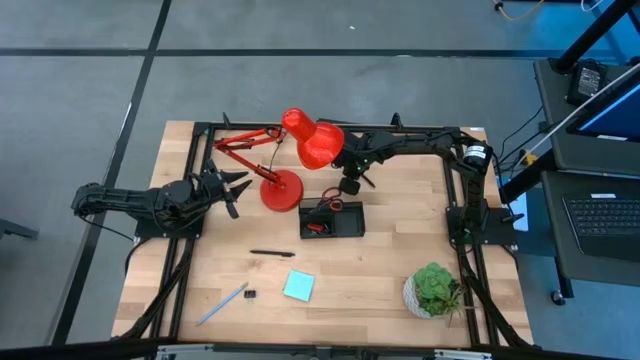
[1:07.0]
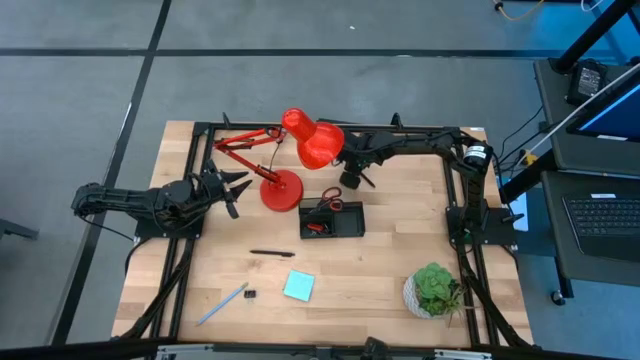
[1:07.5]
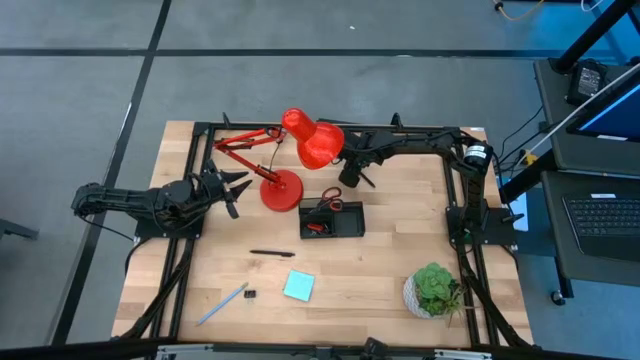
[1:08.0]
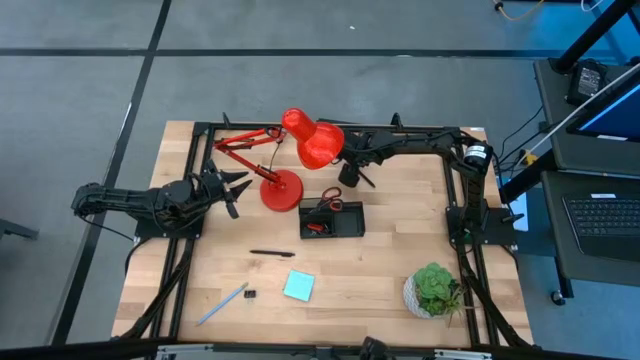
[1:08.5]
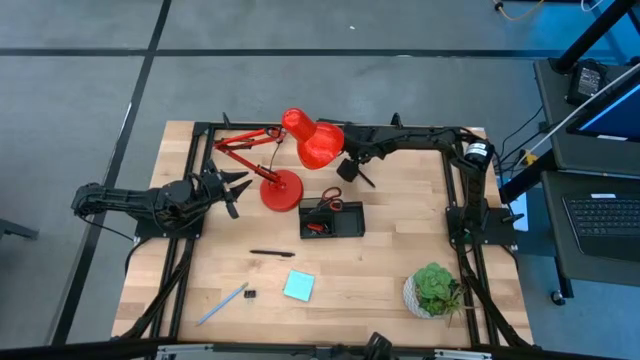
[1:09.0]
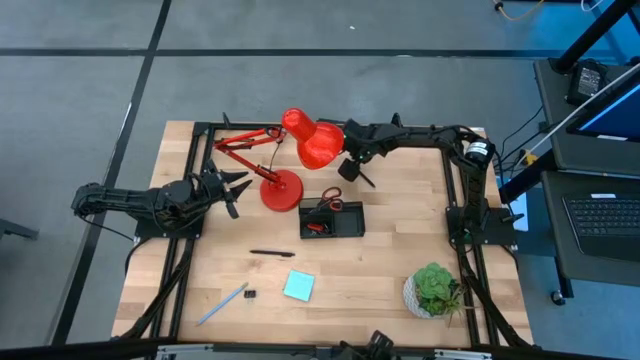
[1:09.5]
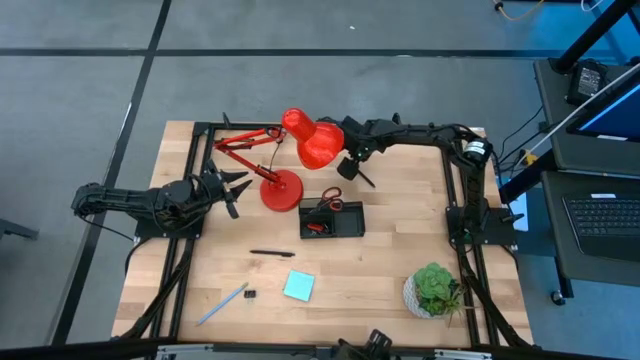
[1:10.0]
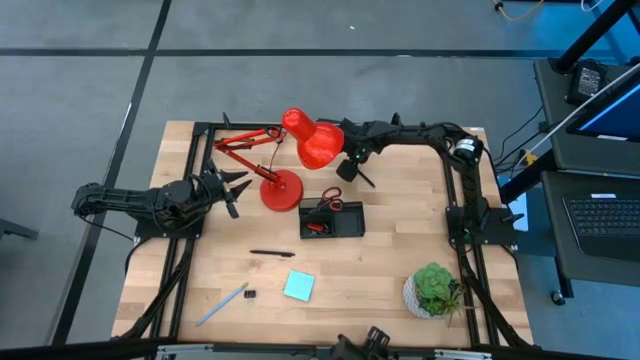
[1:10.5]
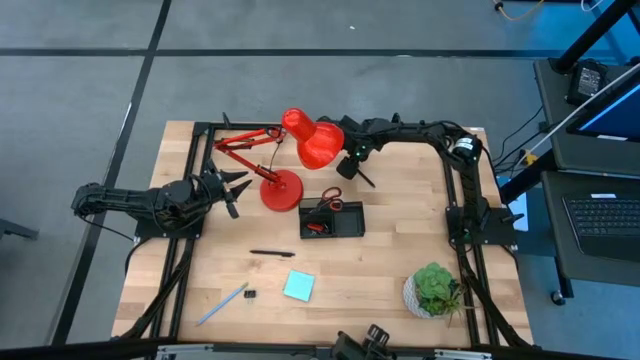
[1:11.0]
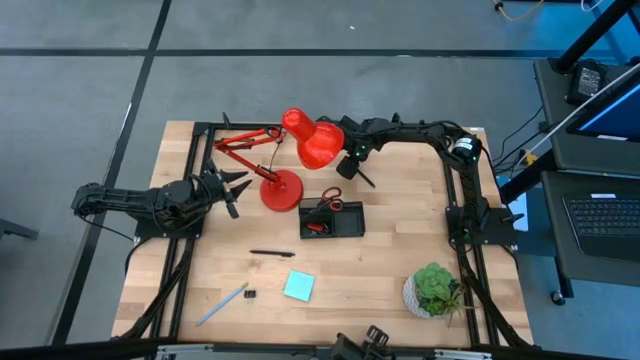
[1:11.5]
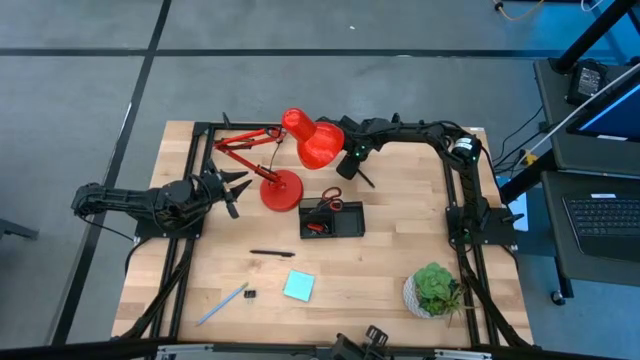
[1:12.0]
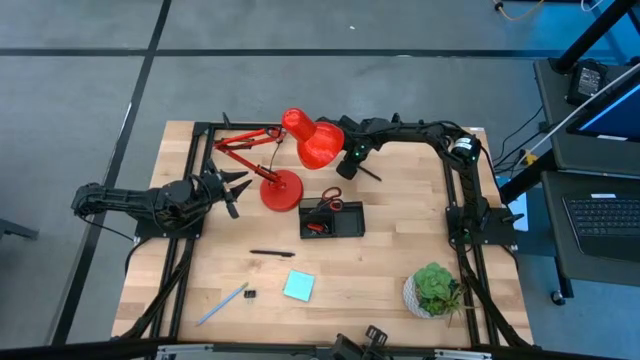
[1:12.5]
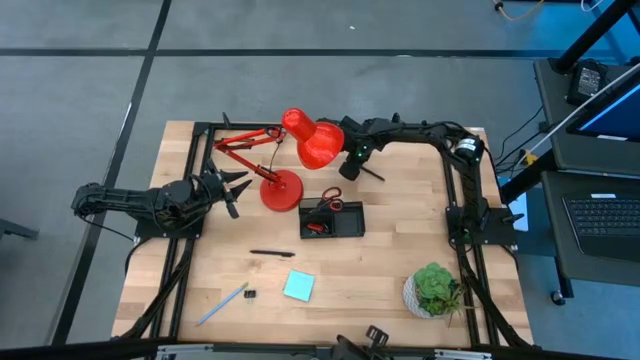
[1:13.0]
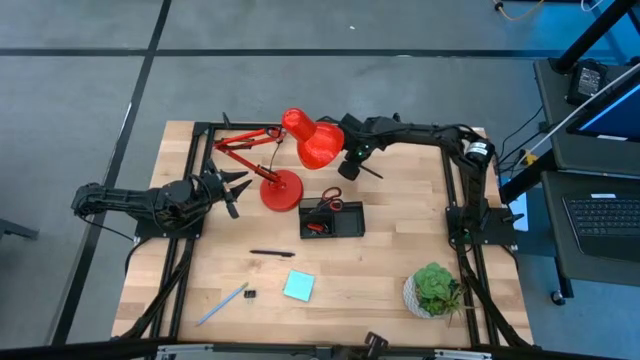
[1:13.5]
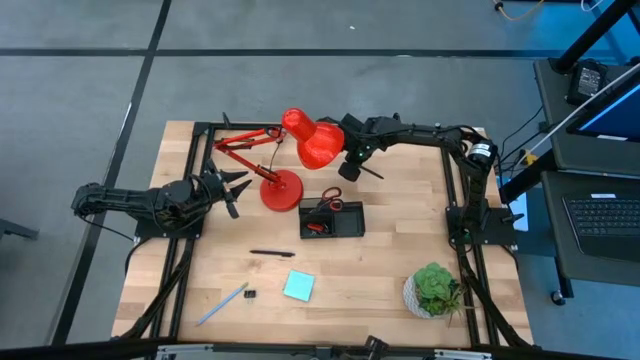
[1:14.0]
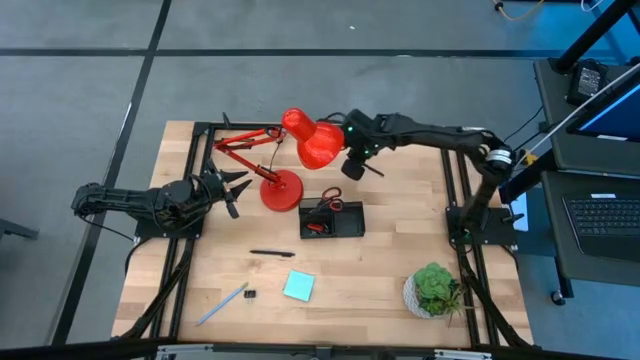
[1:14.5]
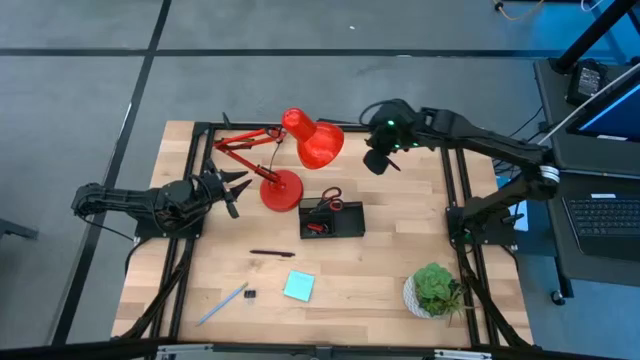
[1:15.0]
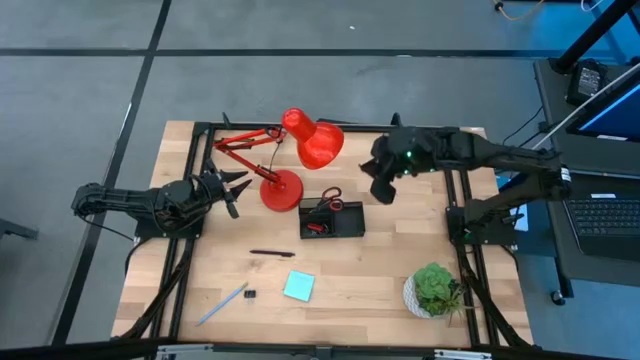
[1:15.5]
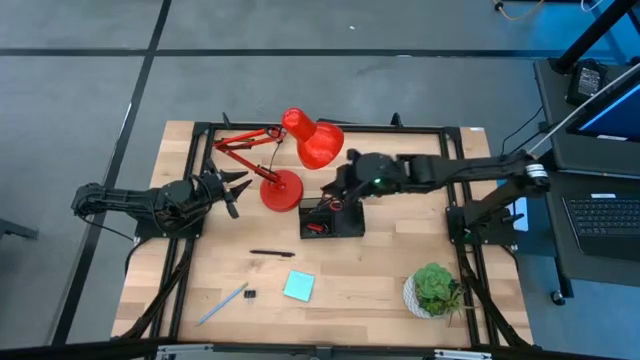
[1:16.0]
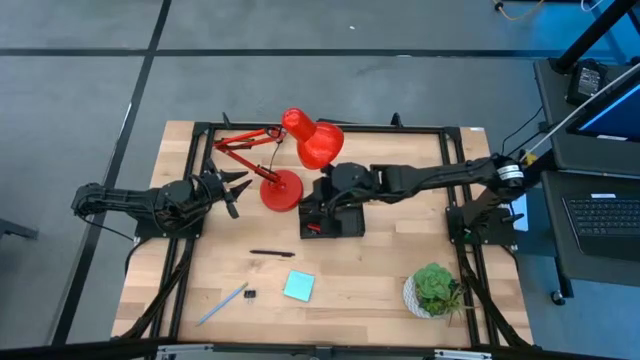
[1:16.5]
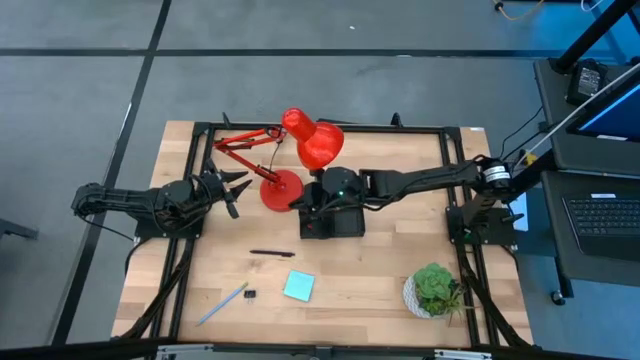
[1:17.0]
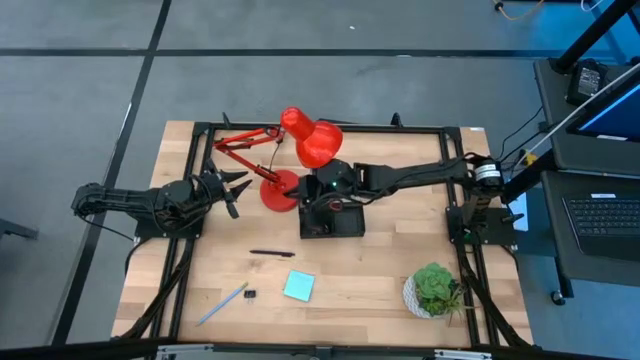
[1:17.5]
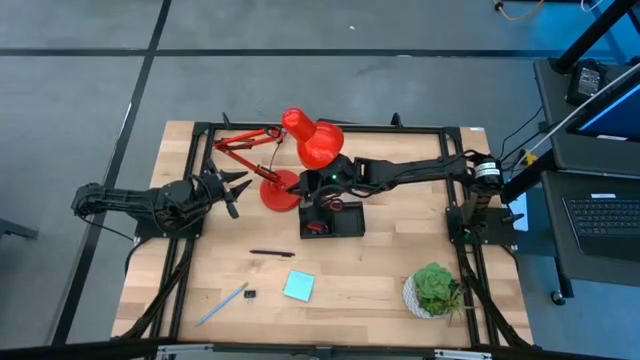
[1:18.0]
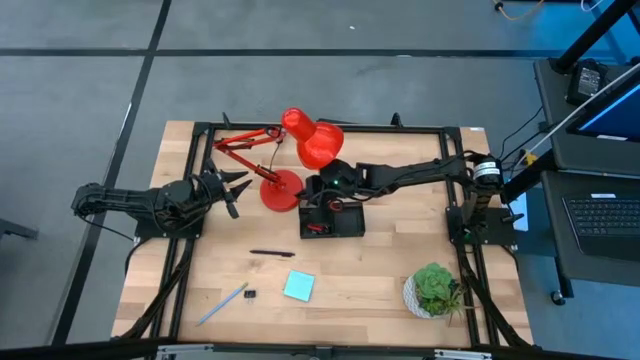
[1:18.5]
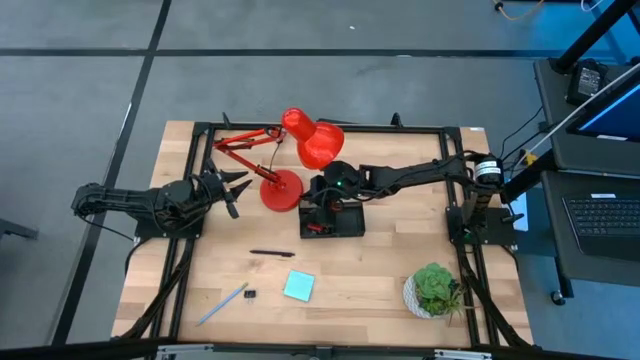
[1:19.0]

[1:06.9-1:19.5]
Task: Pick and place office supplies into organizer
Put the top black pen into the black desk organizer

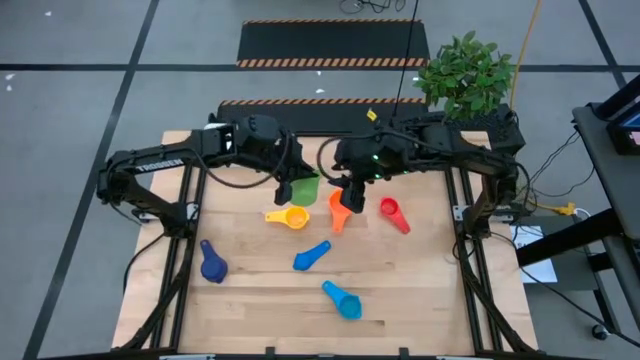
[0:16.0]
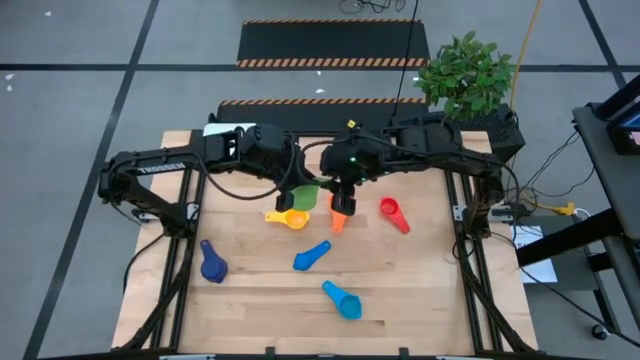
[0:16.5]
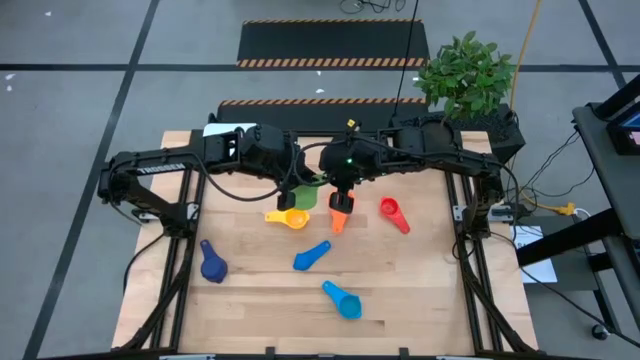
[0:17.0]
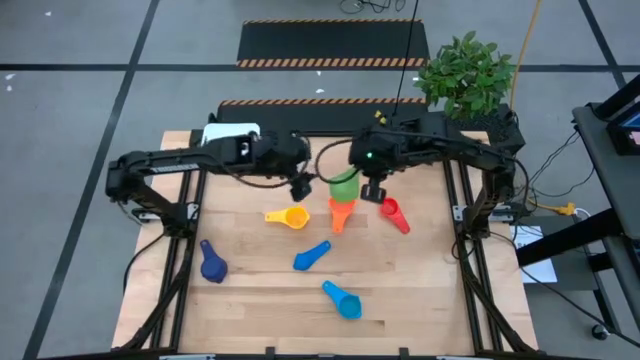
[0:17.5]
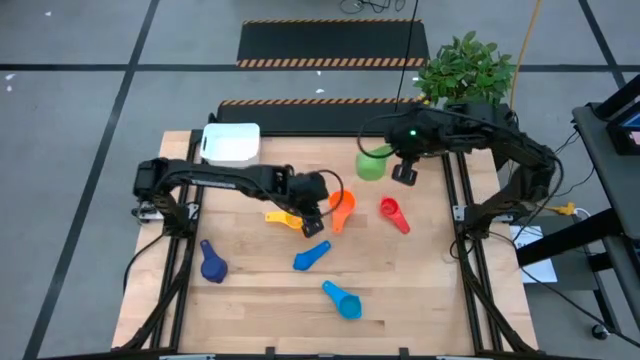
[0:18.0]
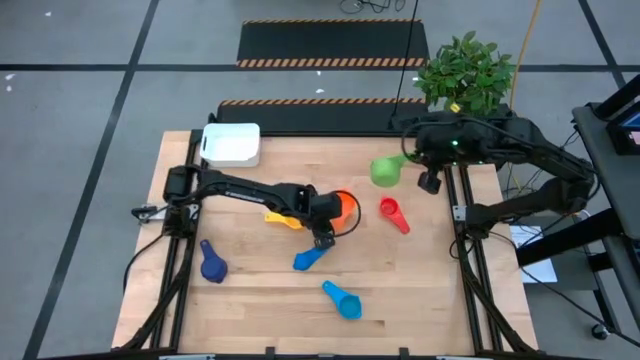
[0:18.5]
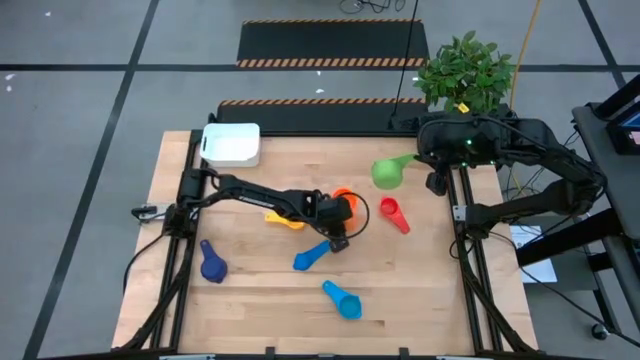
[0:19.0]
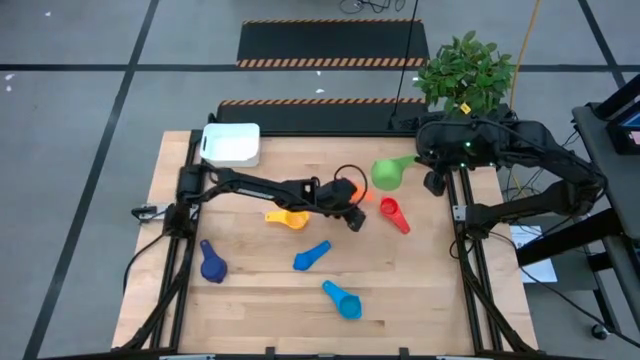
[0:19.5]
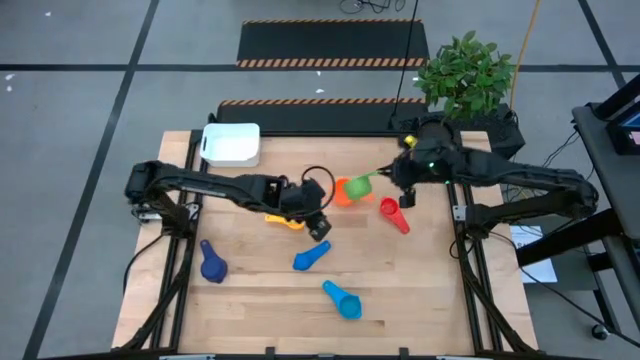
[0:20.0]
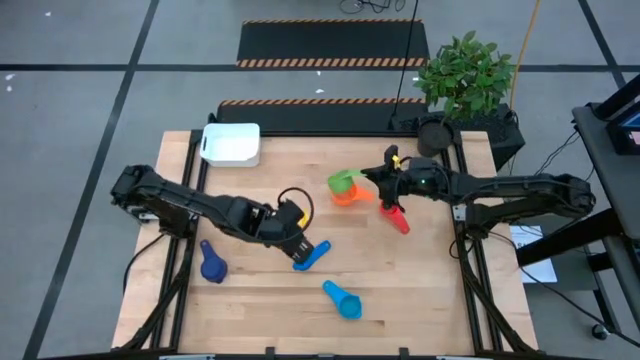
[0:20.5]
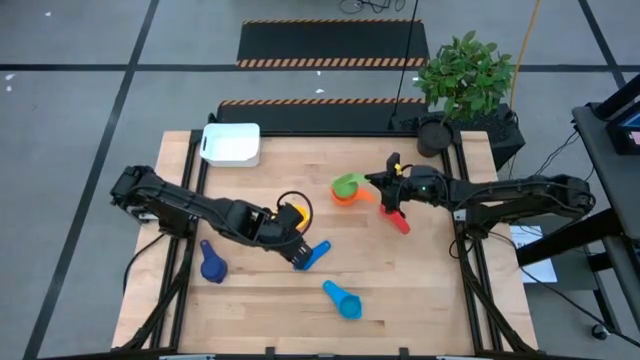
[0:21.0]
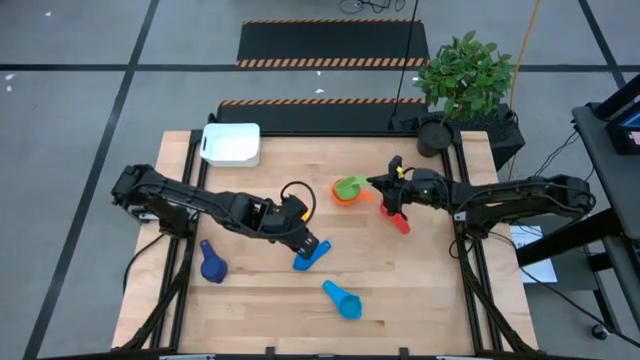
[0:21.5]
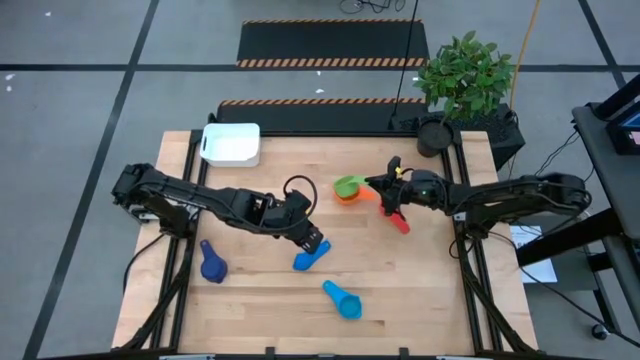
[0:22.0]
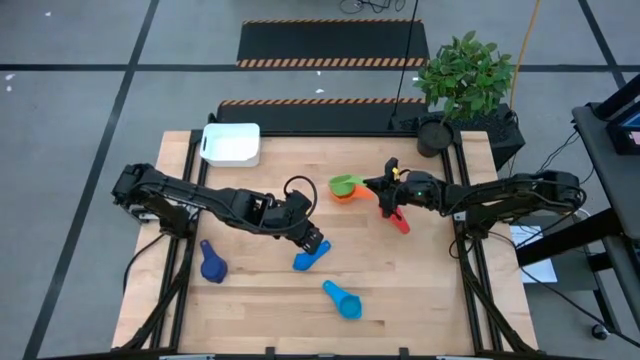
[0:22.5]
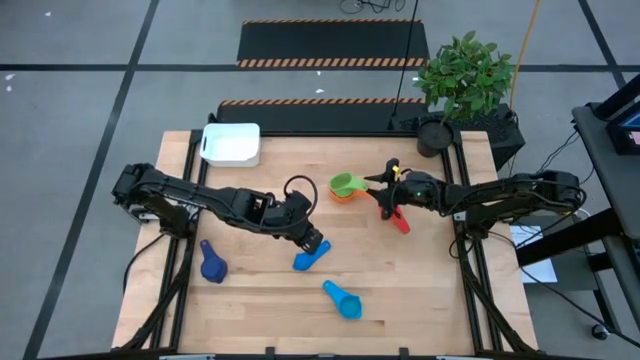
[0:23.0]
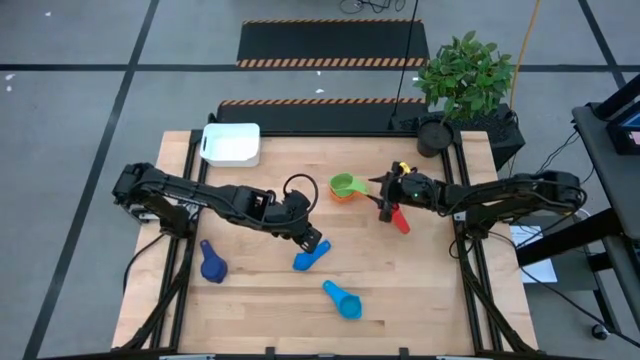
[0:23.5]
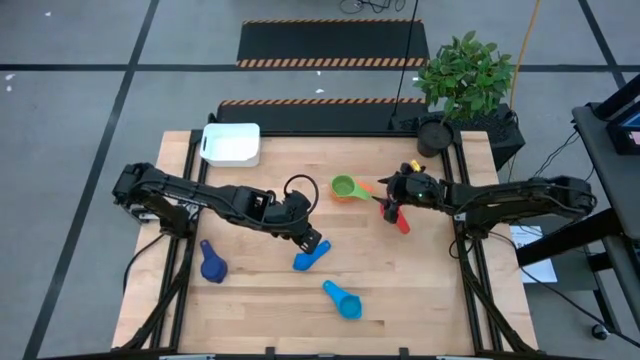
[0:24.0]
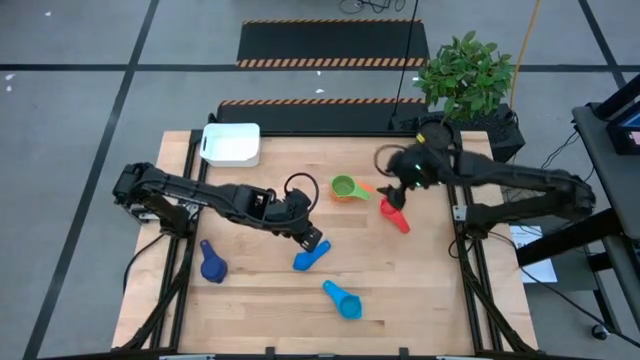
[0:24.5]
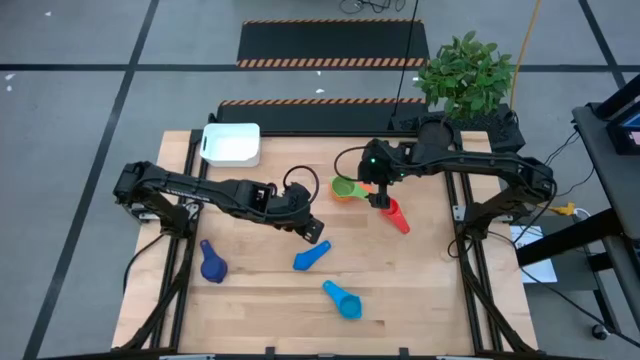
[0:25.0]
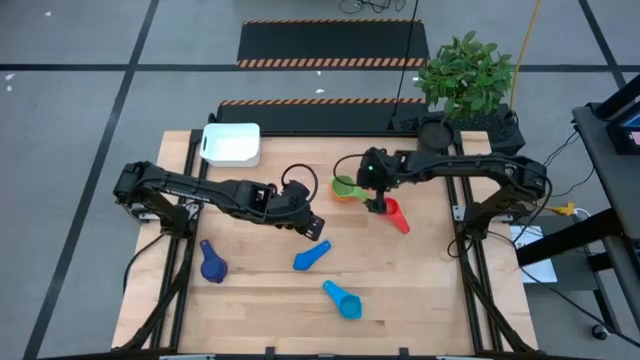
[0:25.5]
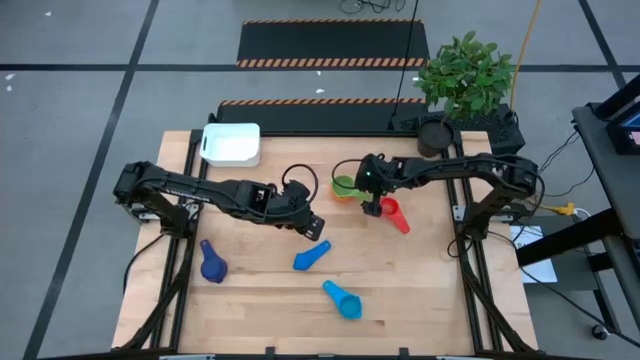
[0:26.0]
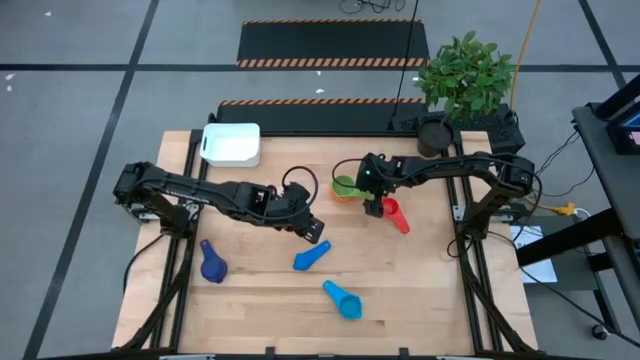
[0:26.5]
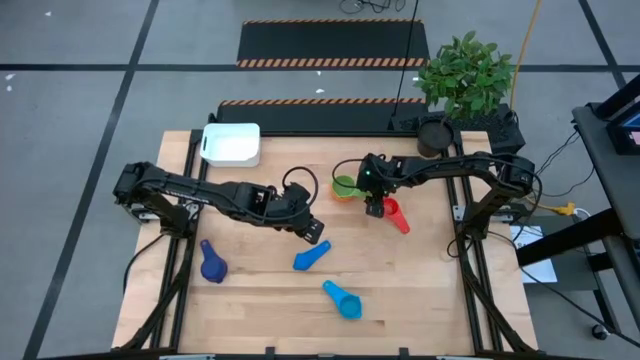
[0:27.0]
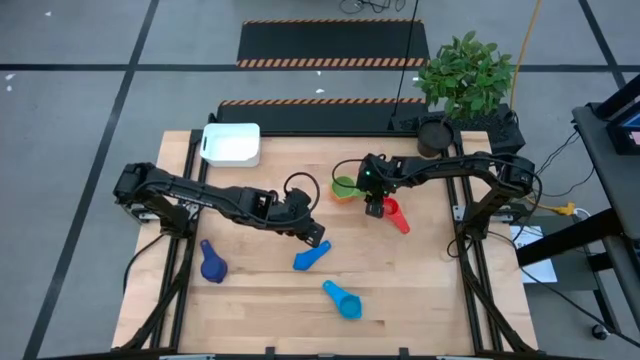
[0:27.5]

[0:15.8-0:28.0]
Task: Nest measuring cups in basket
Stack the green measuring cup into the orange measuring cup
